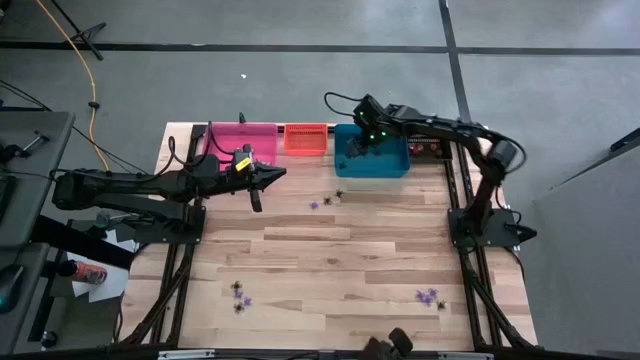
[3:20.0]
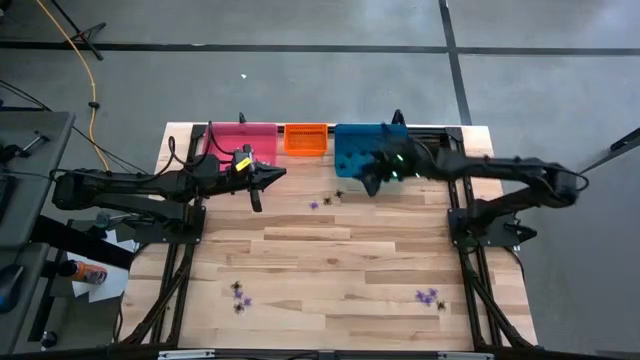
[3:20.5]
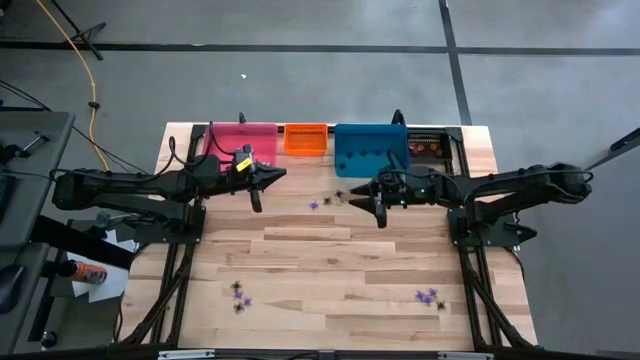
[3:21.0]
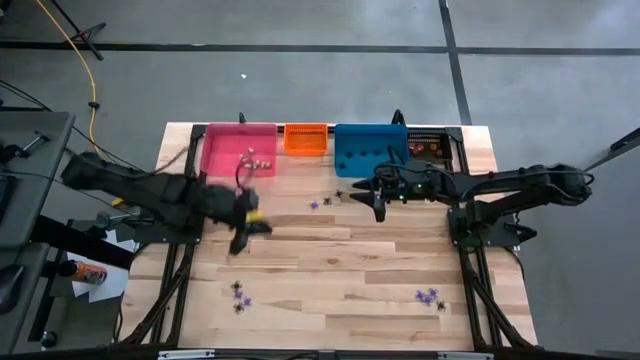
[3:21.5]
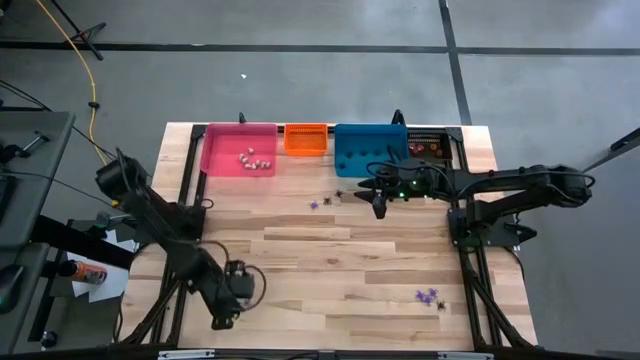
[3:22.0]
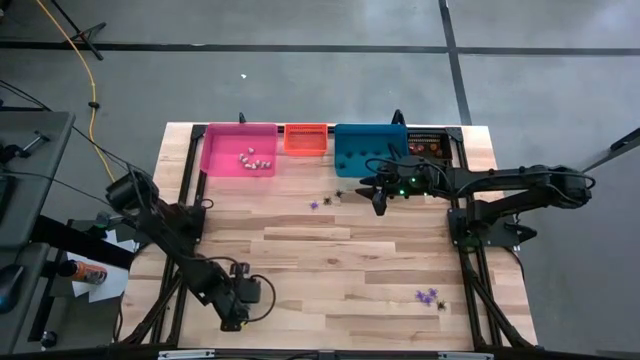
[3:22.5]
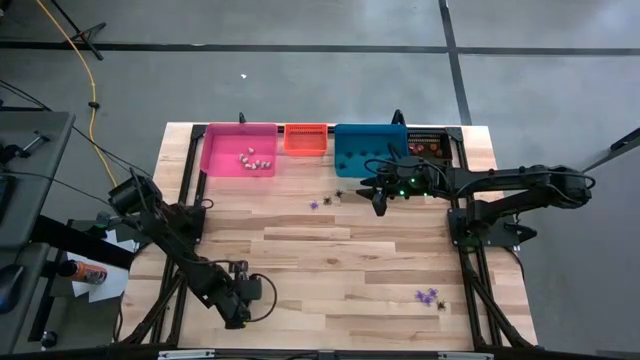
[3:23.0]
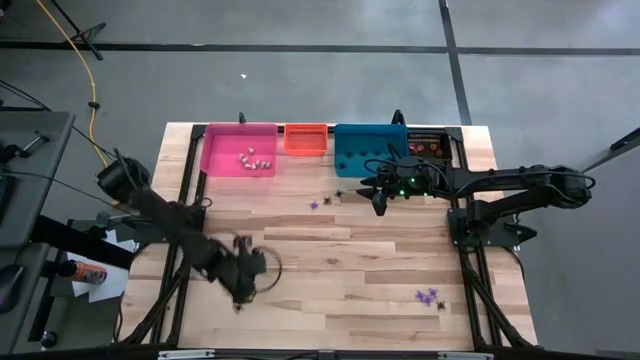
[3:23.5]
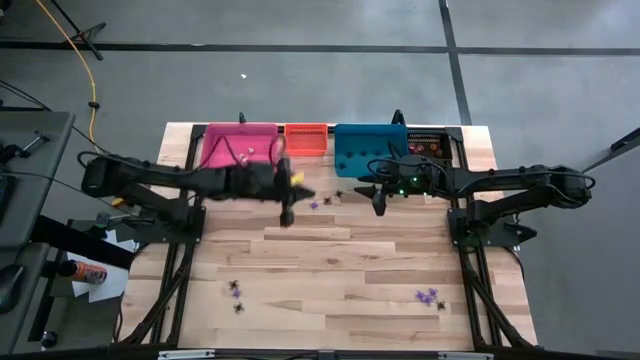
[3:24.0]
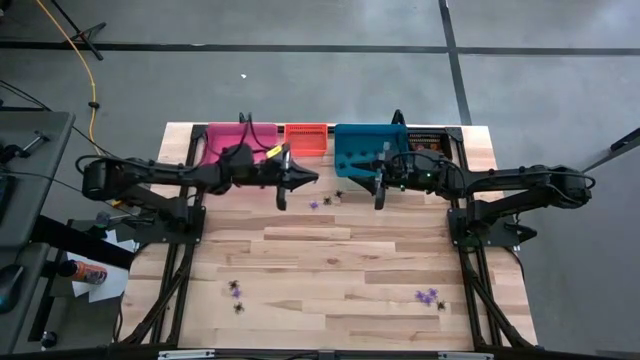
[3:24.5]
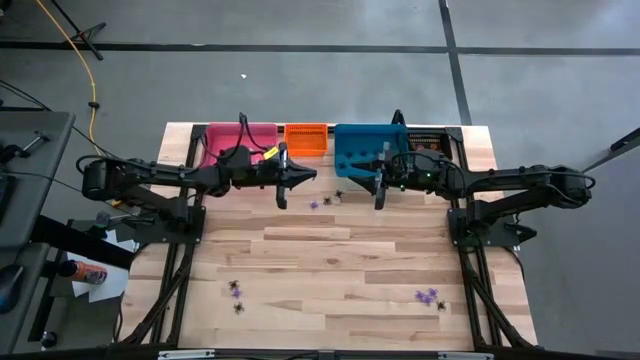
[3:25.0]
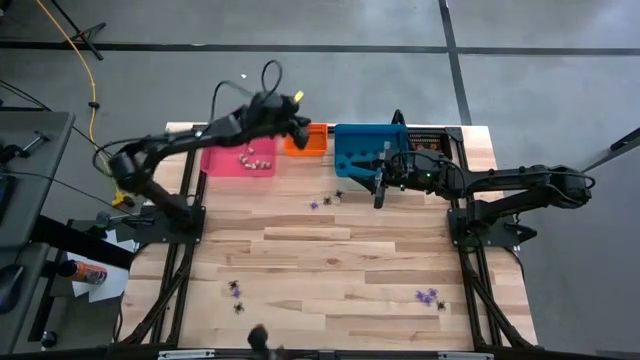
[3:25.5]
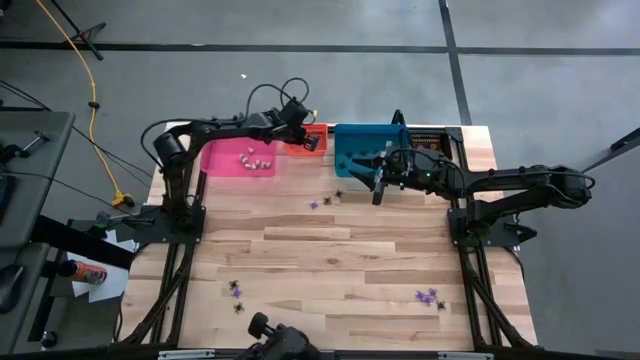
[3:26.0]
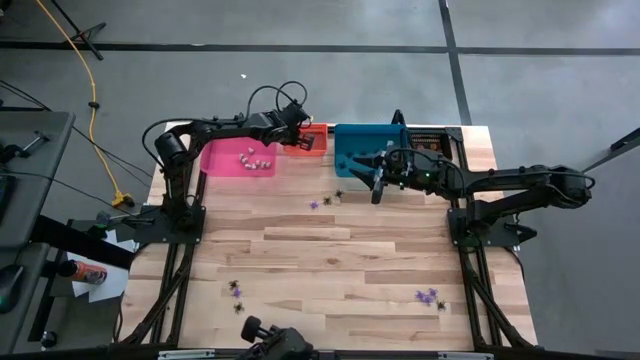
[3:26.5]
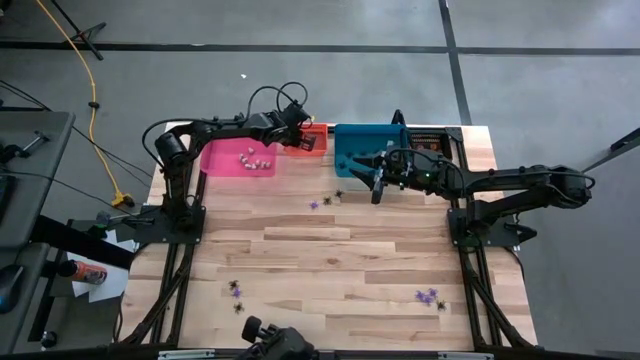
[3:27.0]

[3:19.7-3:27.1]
Task: Sort Halloween decoration
Put the violet spider toy into the orange bin

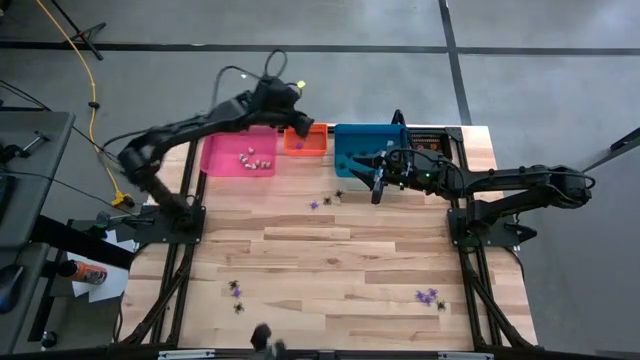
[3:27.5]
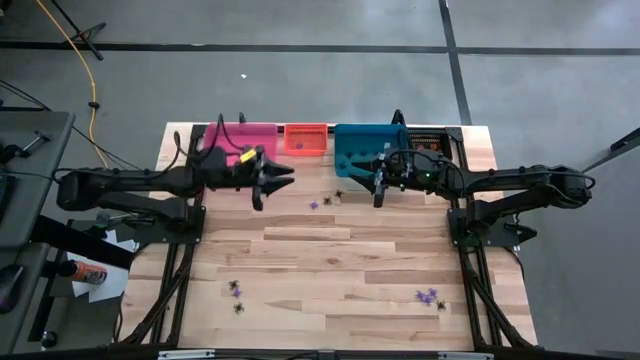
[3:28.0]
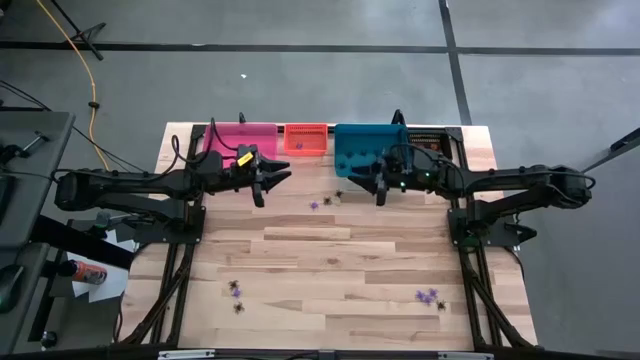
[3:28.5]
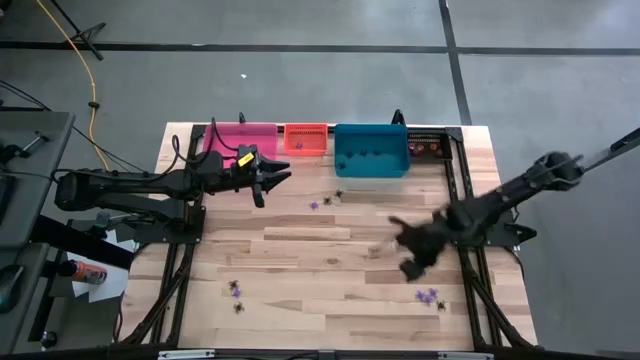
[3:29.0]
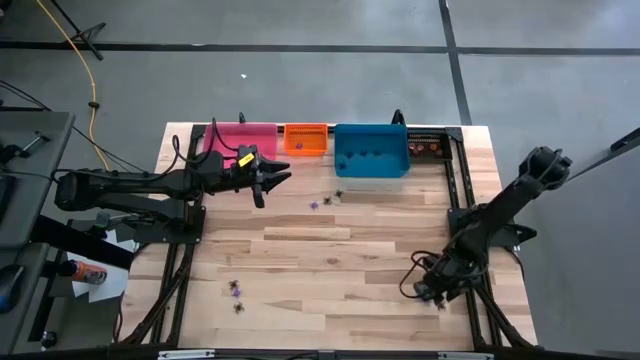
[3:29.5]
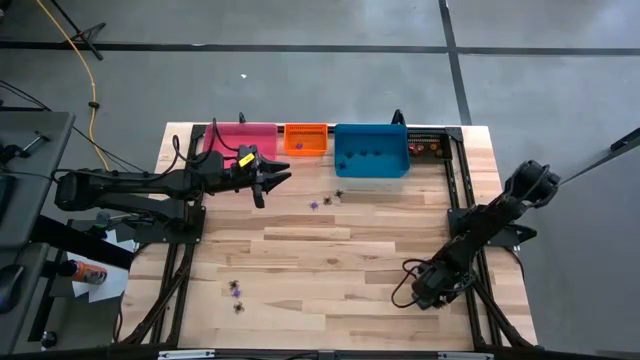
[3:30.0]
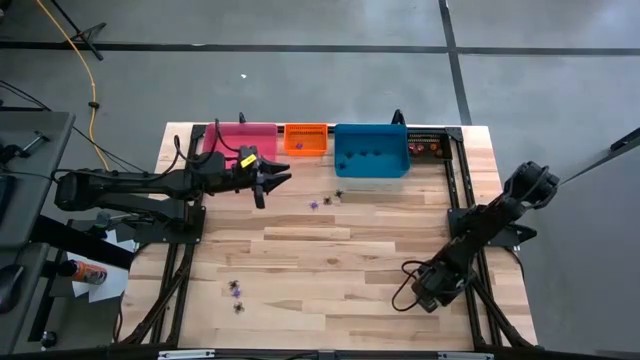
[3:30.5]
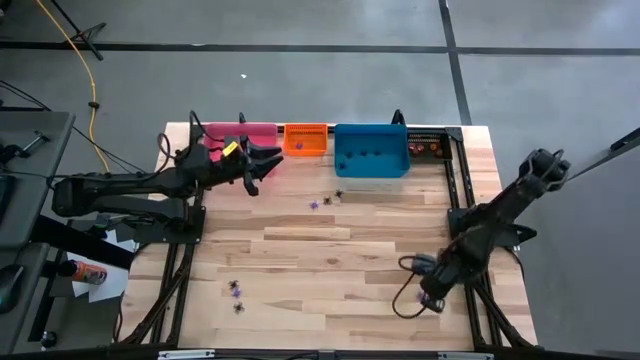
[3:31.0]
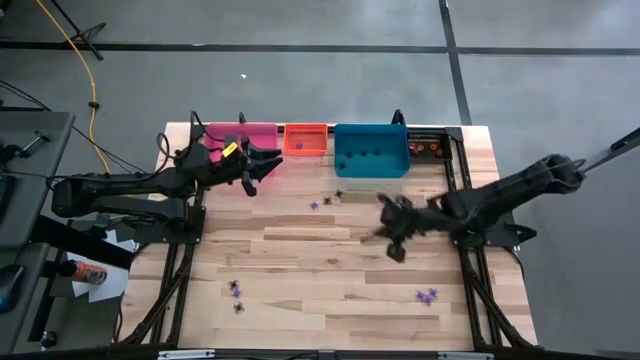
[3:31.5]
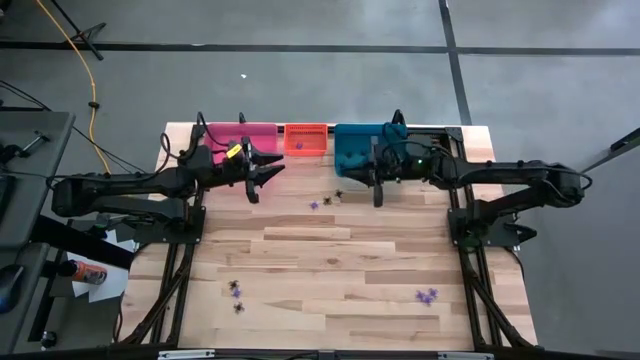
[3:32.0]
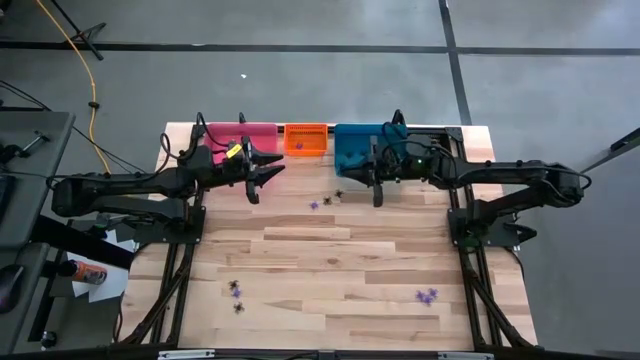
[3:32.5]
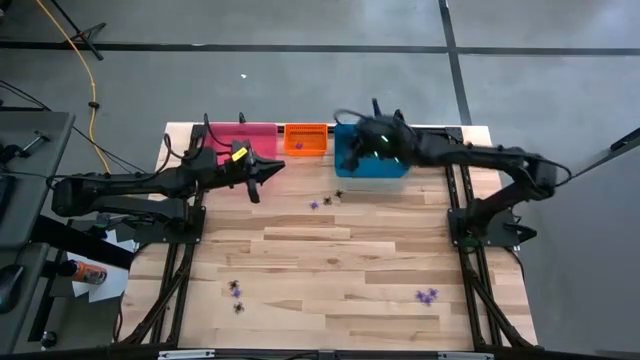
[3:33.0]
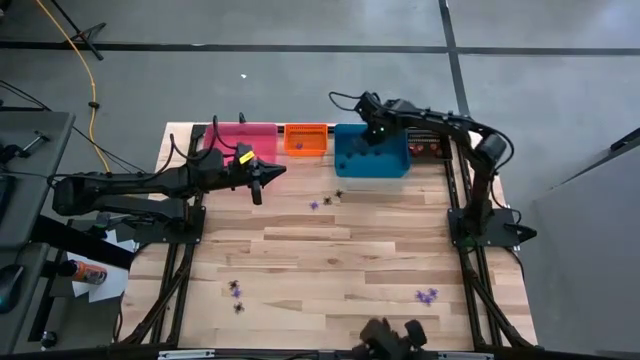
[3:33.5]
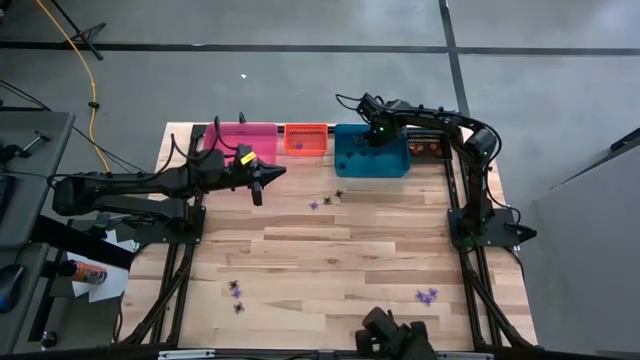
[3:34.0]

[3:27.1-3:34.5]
Put the black spider toy into the blue bin

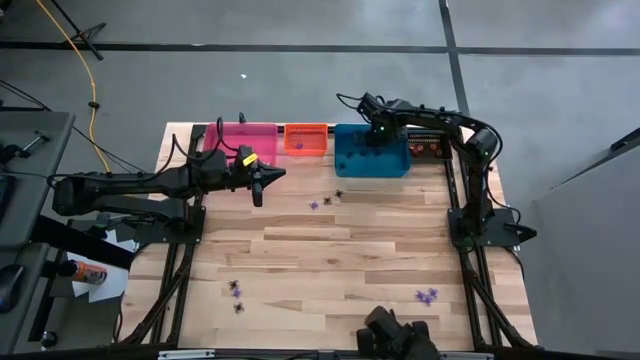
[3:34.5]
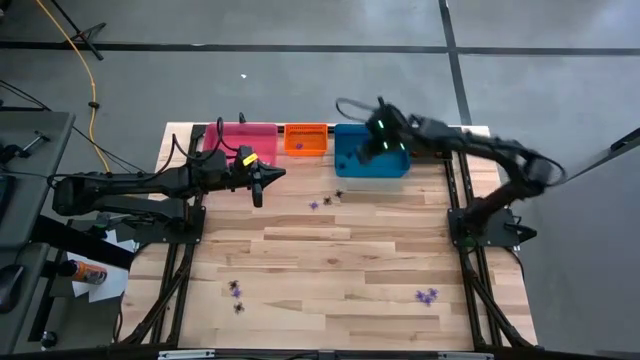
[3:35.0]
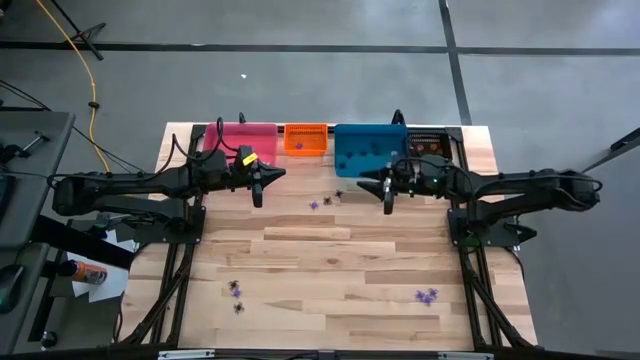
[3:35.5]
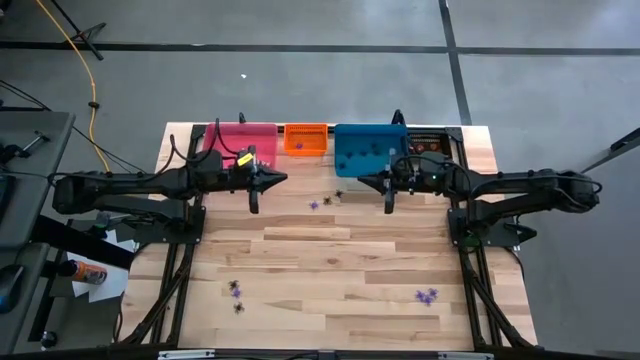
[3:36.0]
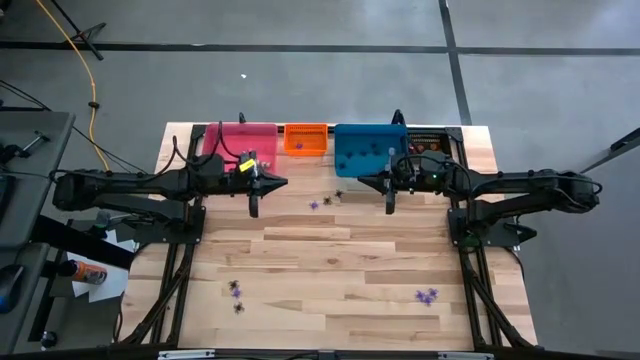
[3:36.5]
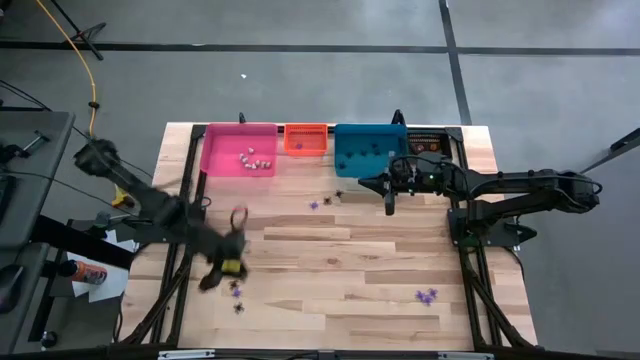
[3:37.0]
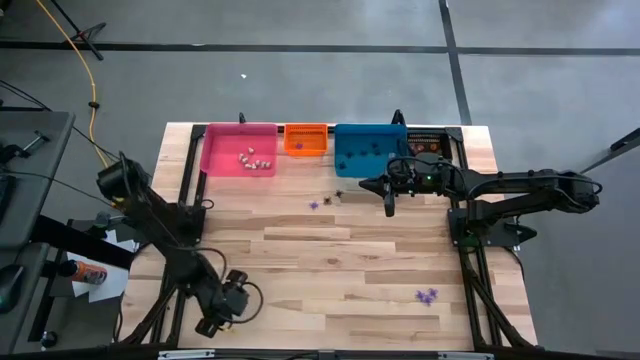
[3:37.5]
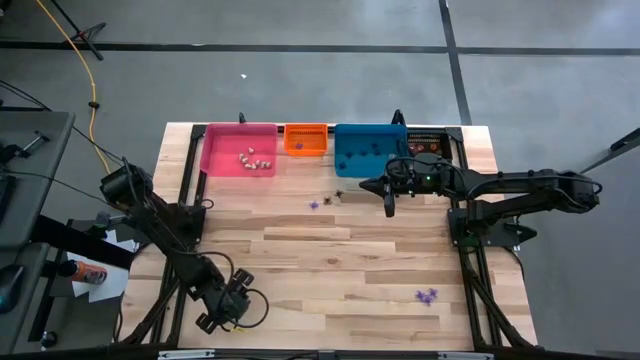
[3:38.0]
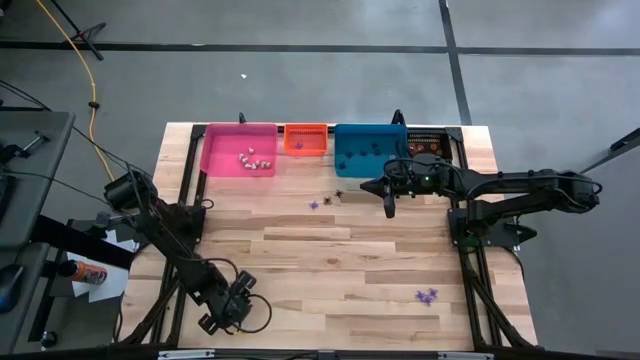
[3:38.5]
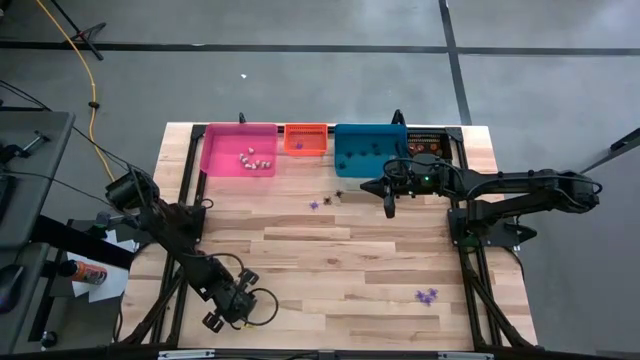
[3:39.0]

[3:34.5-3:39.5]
Put the black spider toy into the blue bin

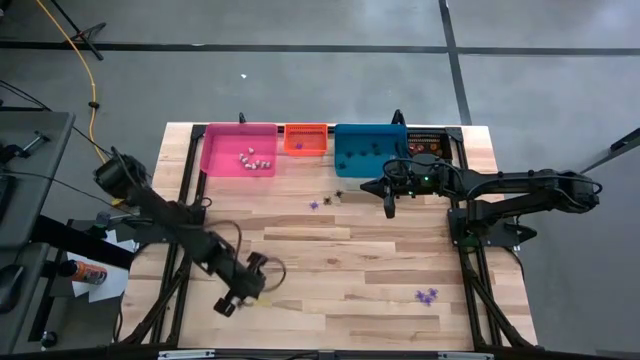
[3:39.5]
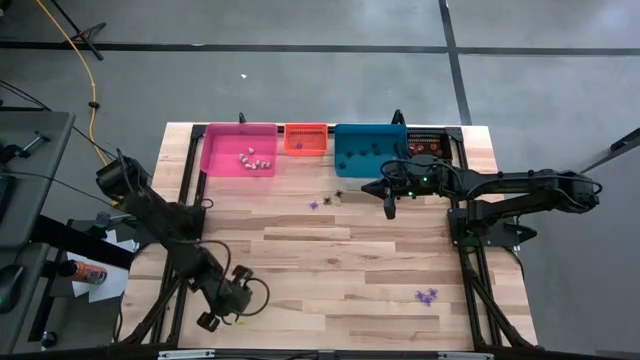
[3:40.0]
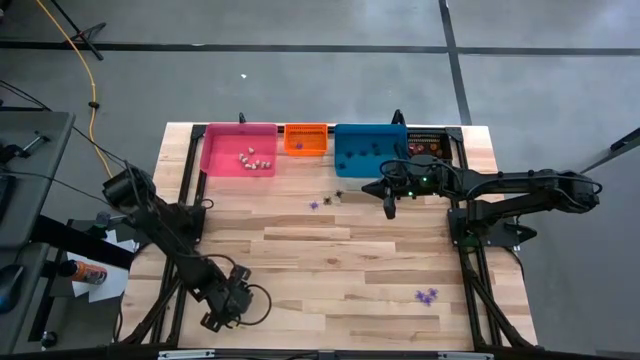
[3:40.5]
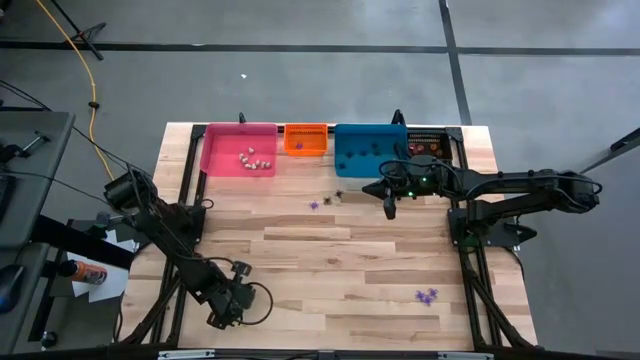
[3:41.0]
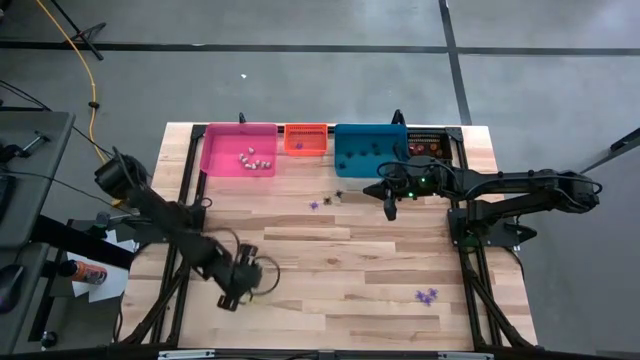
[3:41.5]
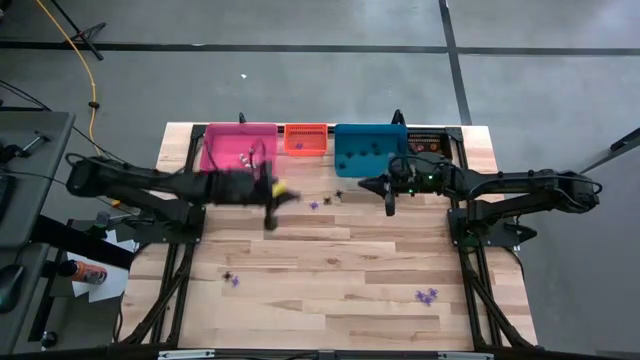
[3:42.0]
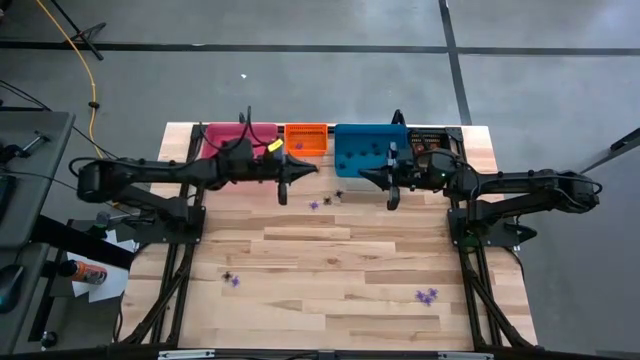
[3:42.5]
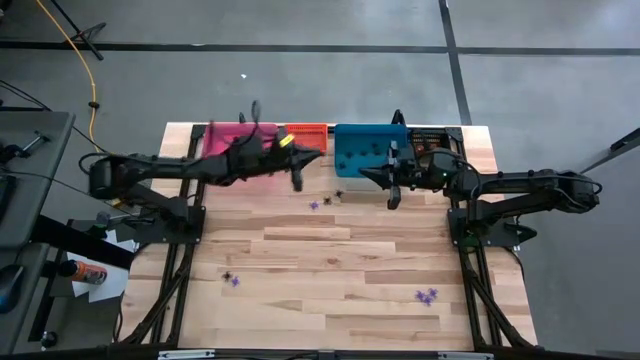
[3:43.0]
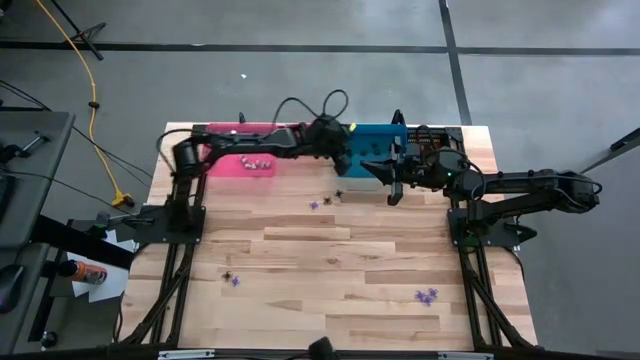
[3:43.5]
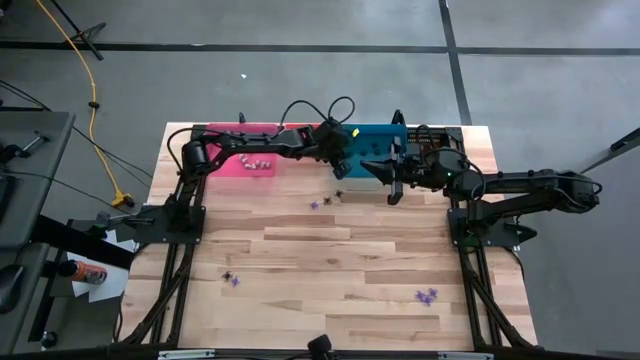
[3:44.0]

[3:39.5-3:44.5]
Put the black spider toy into the blue bin
